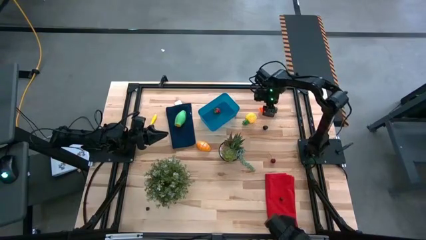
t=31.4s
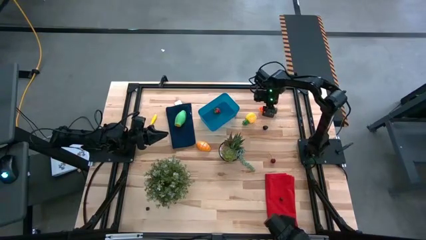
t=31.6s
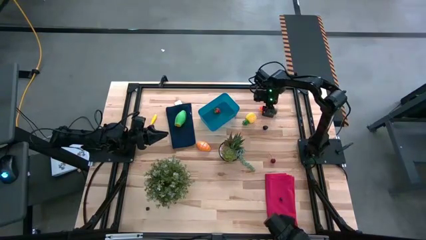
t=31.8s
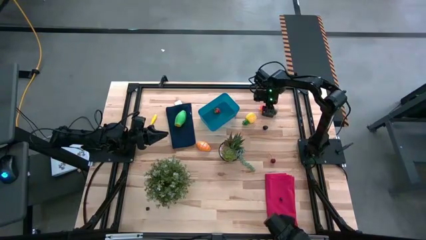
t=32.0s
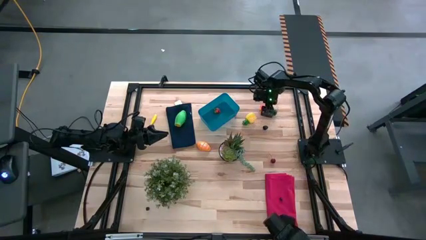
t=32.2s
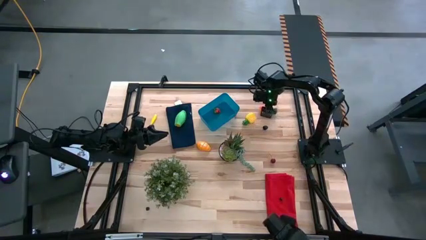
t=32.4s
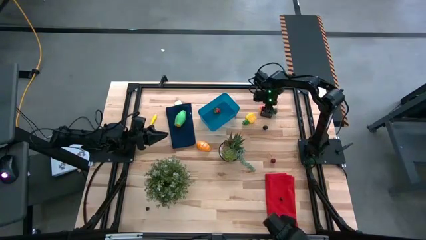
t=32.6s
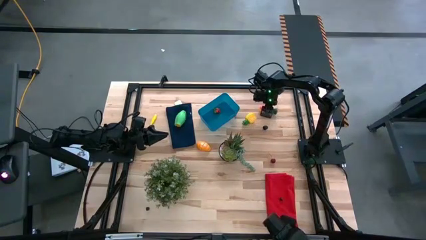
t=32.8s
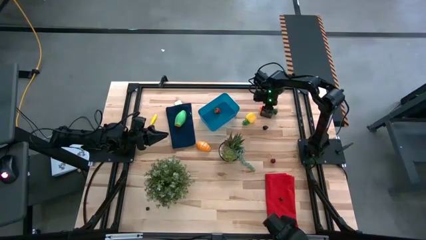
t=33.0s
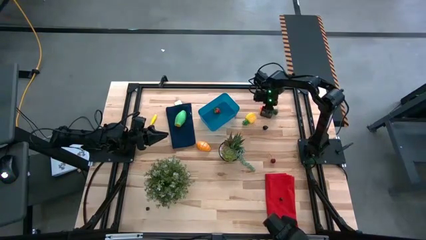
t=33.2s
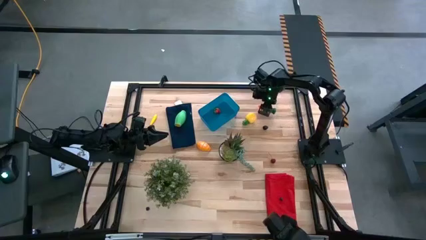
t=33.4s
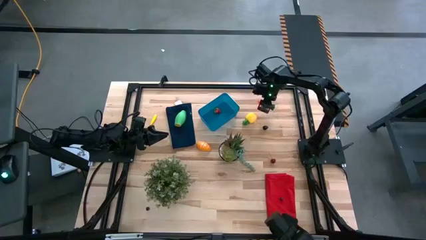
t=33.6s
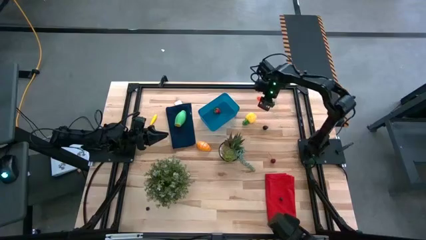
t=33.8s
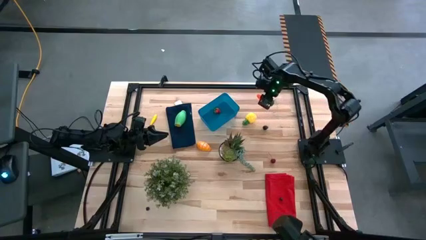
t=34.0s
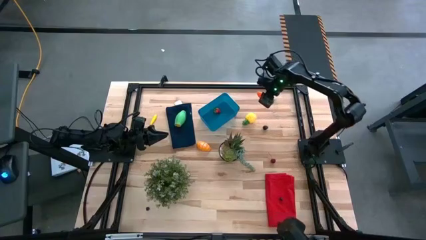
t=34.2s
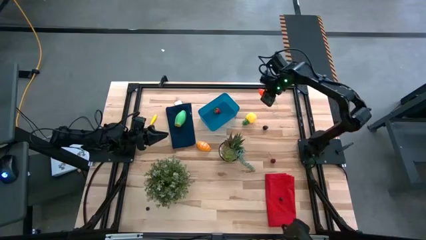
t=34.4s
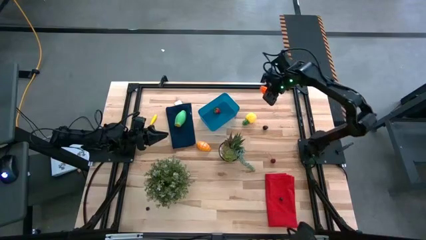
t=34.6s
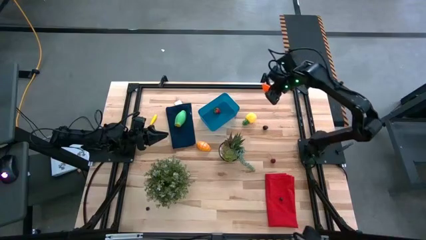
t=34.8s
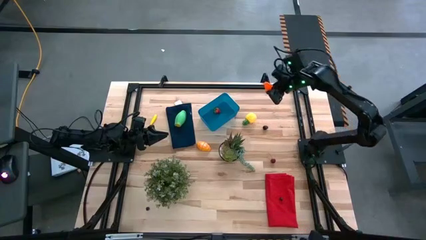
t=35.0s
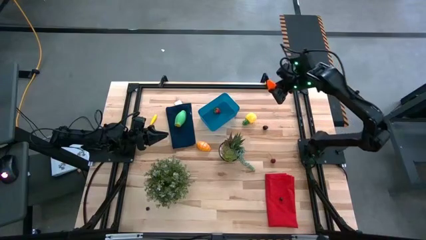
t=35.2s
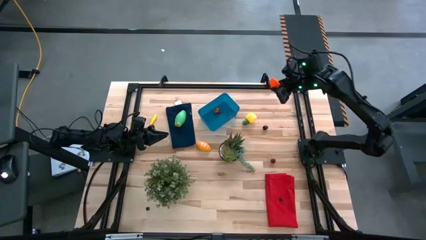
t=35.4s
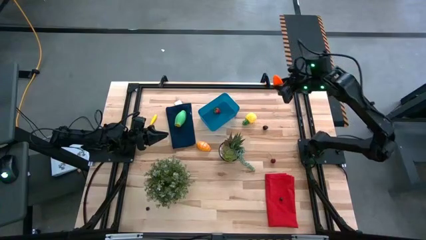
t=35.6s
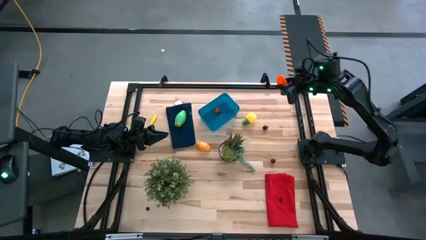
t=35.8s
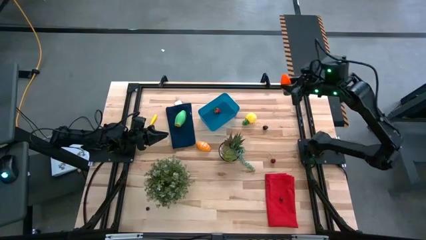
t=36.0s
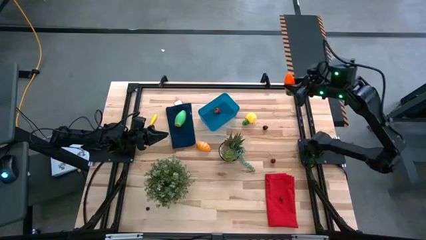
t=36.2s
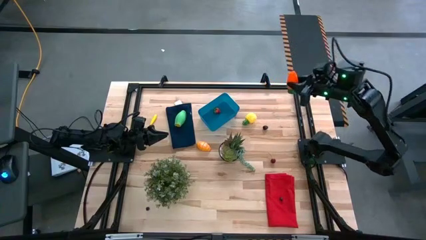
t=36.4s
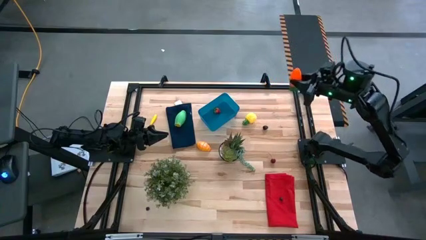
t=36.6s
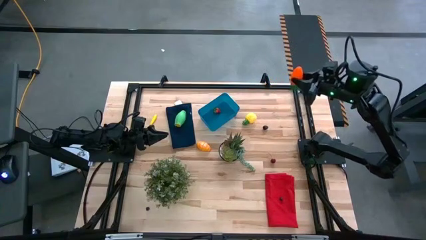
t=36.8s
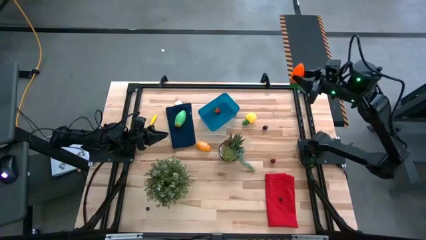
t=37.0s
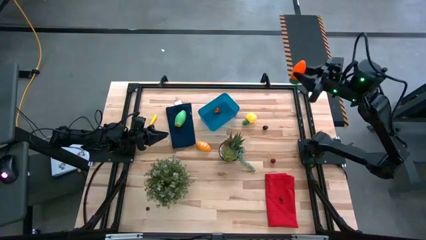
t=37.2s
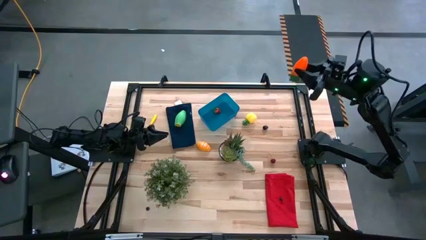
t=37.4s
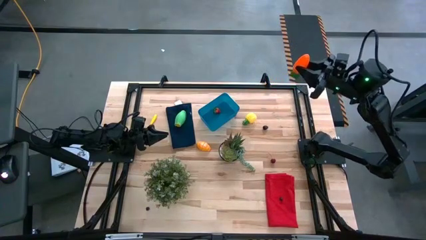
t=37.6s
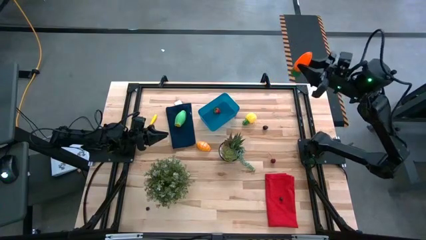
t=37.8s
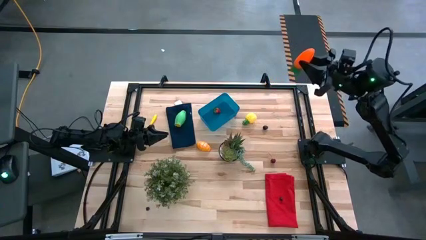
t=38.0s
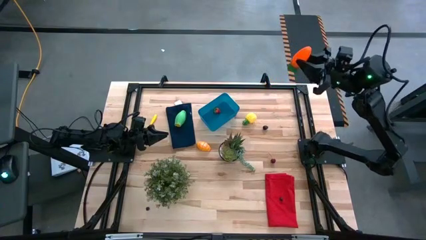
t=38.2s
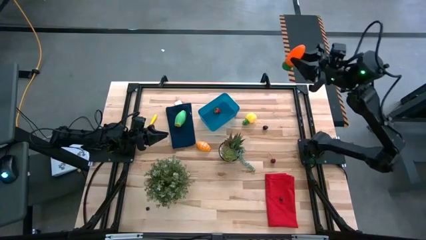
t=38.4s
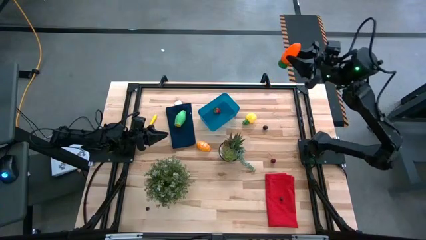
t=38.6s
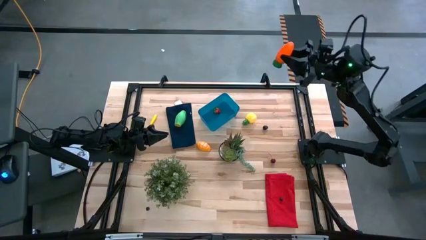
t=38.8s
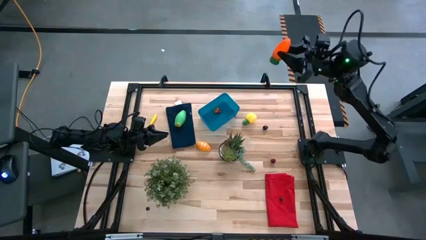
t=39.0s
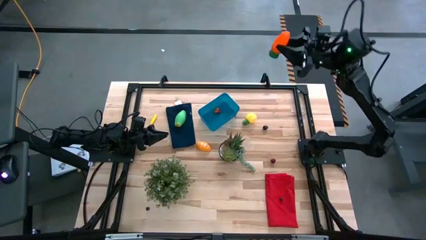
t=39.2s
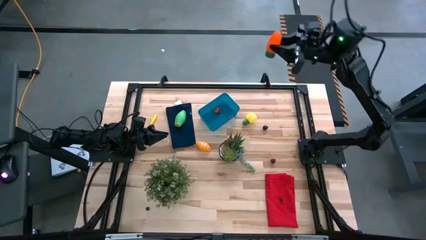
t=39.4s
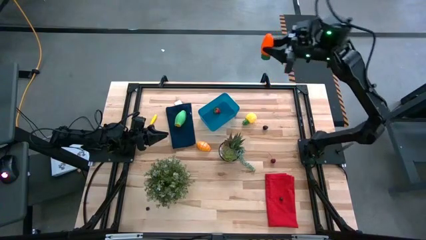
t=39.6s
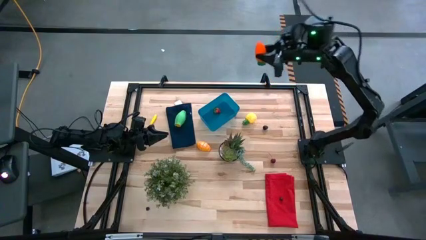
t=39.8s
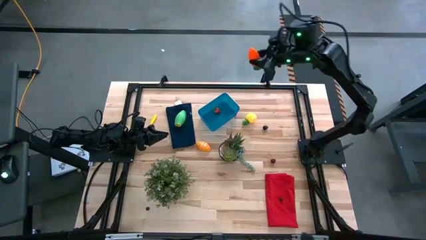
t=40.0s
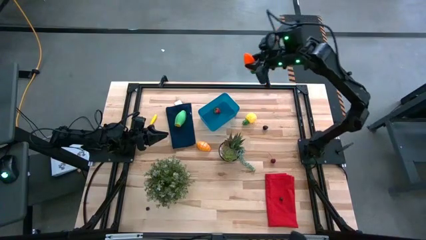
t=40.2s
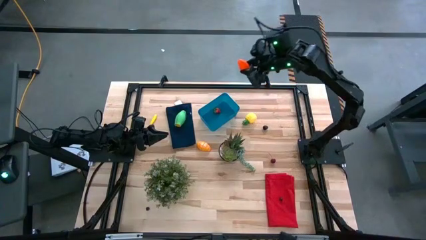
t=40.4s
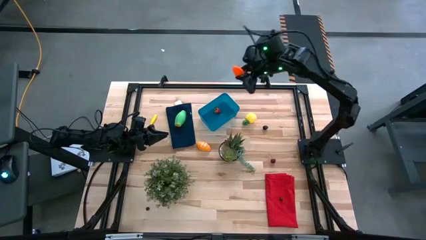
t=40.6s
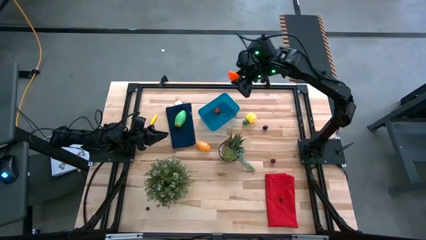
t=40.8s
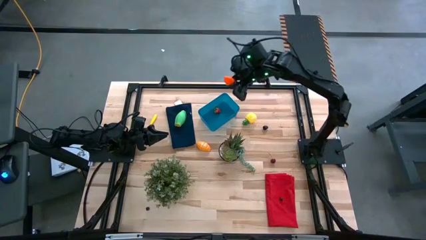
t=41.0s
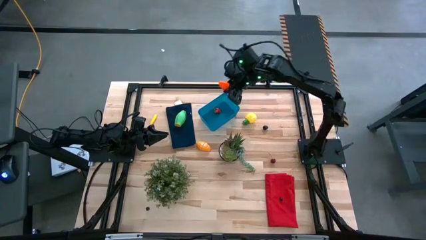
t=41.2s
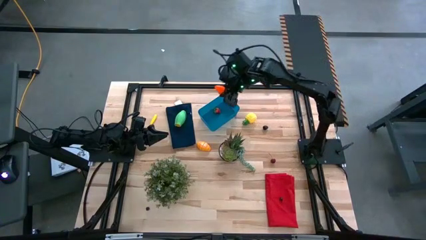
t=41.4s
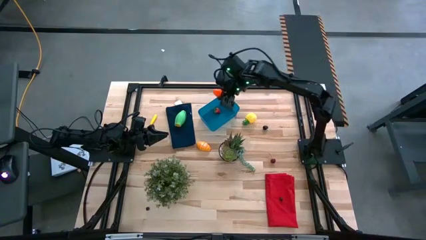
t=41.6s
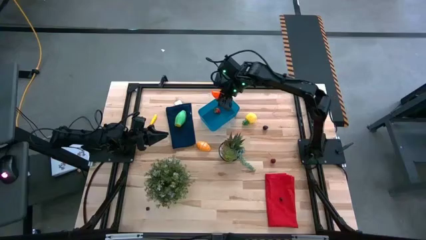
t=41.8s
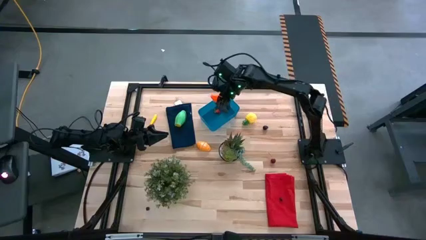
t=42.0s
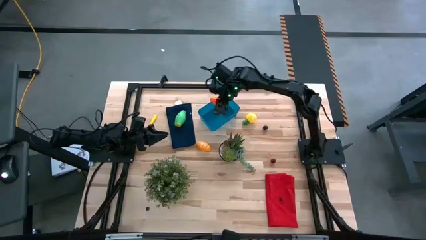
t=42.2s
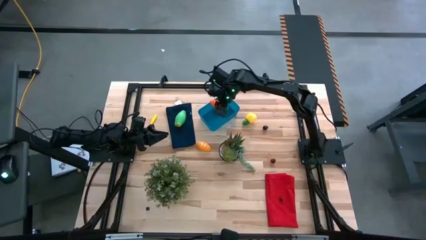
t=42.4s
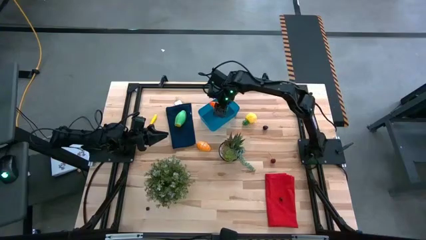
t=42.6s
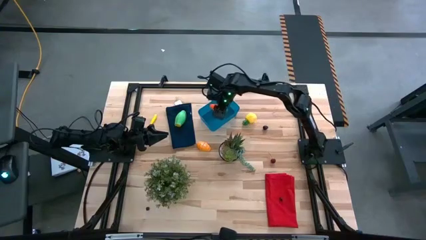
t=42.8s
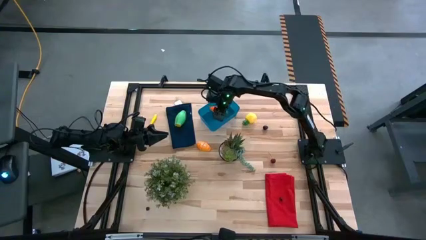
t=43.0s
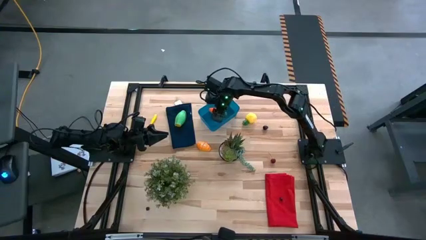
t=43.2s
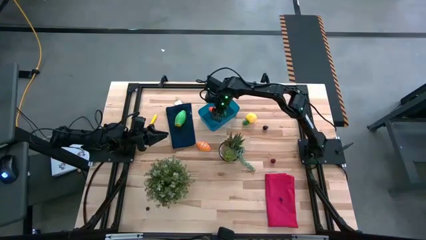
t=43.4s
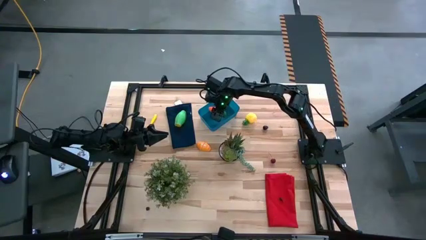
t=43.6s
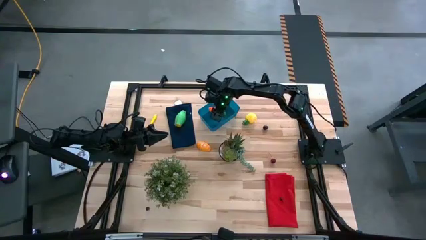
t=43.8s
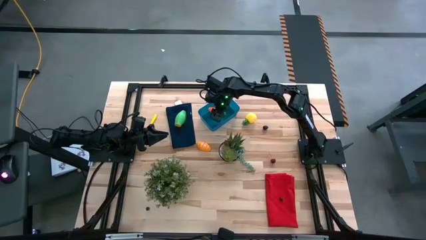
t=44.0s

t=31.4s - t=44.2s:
Task: Pick and placing Produce into tupperware
Put the orange carrot into the blue bin

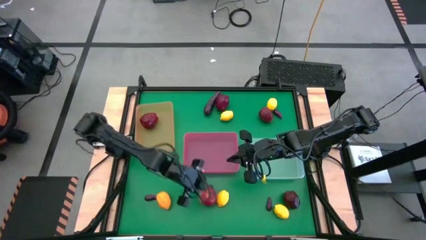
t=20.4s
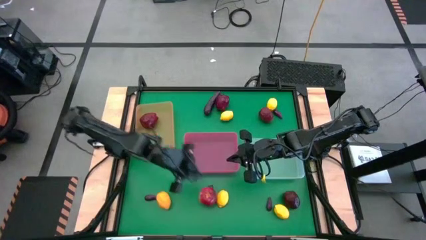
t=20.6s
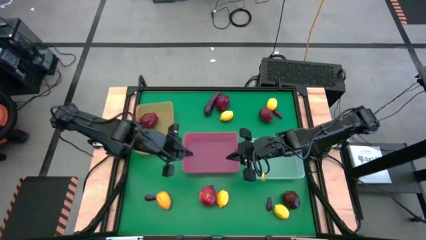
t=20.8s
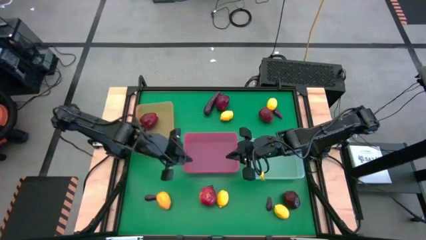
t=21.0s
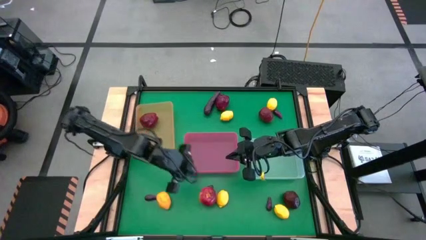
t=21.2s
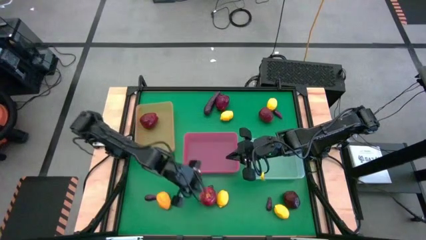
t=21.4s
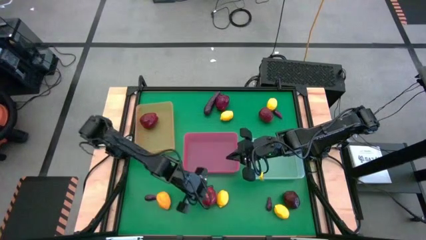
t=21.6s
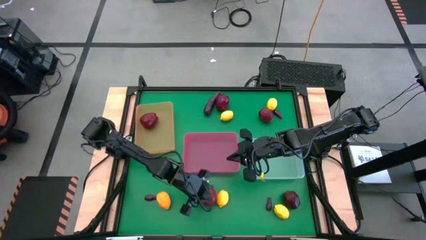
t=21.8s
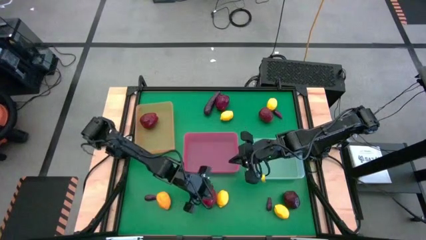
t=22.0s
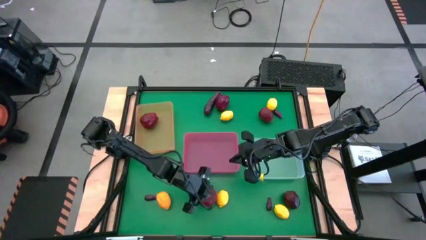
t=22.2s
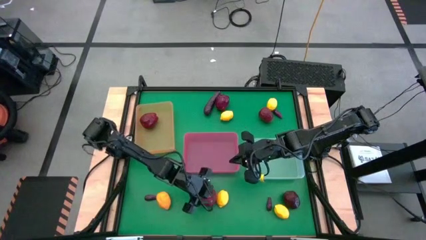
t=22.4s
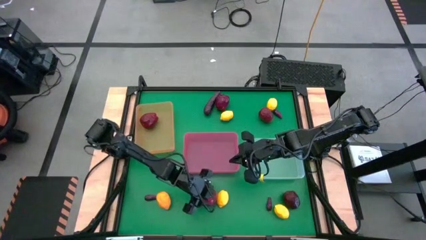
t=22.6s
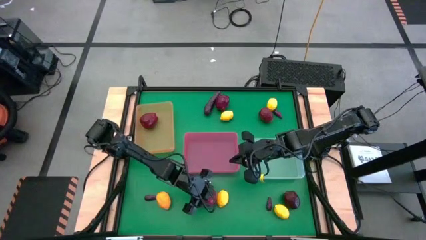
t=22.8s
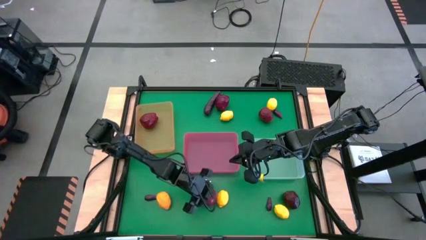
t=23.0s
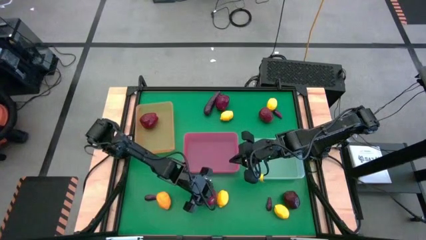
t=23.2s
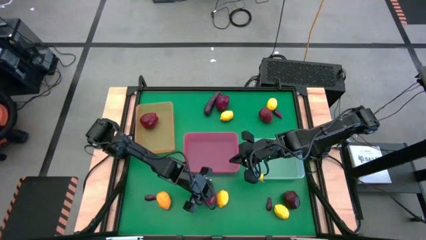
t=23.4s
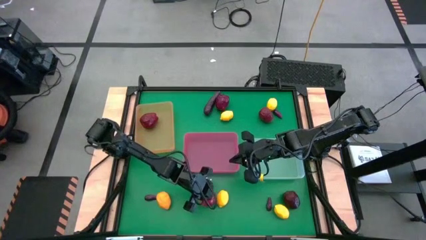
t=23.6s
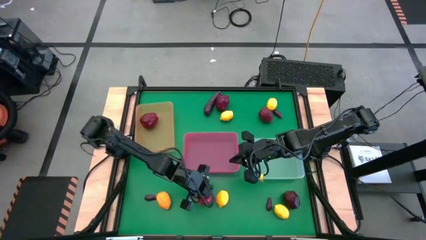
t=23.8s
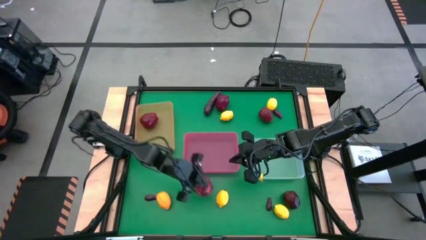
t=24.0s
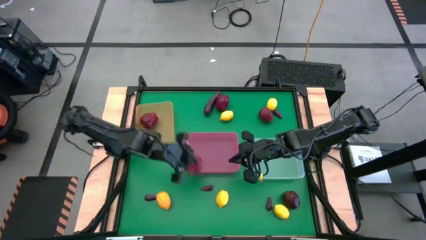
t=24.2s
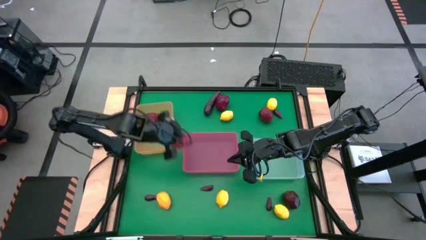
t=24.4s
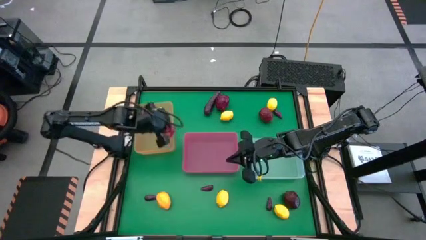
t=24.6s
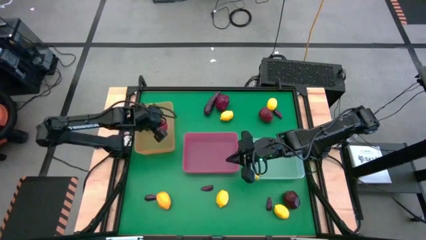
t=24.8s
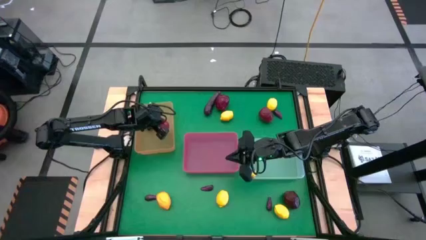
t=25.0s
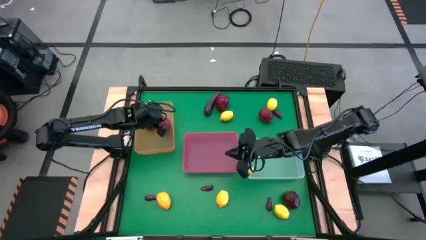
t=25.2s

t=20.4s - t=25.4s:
Task: Sort produce into baskets
Put the red apple into the orange bin
